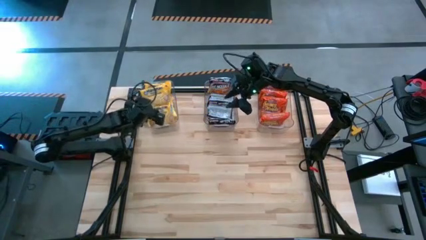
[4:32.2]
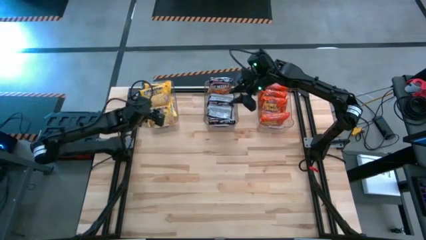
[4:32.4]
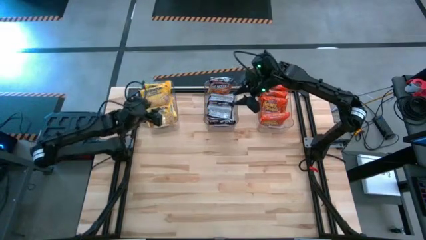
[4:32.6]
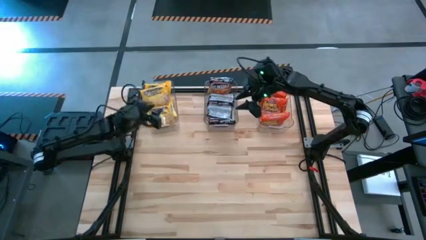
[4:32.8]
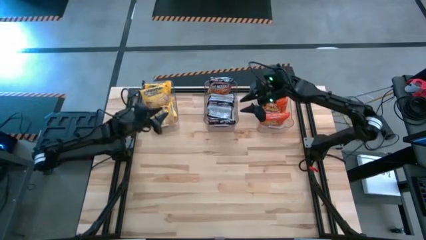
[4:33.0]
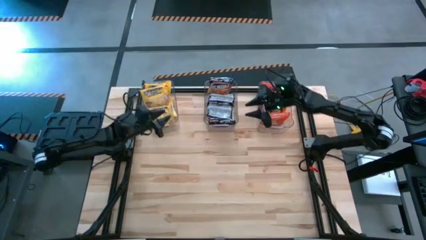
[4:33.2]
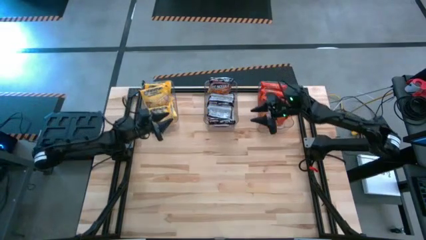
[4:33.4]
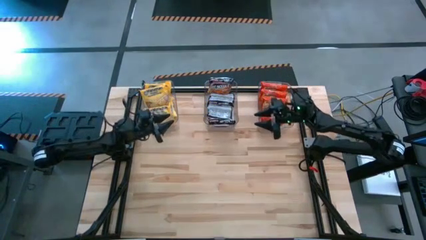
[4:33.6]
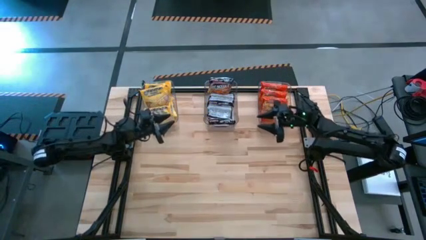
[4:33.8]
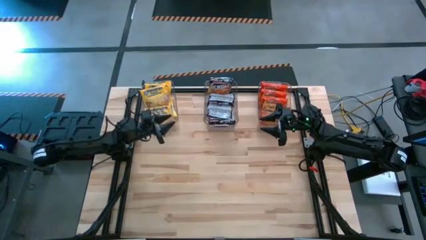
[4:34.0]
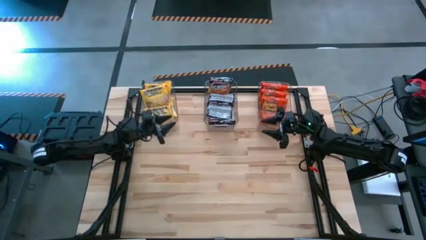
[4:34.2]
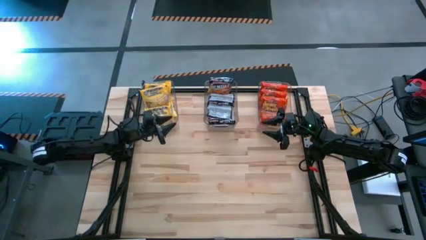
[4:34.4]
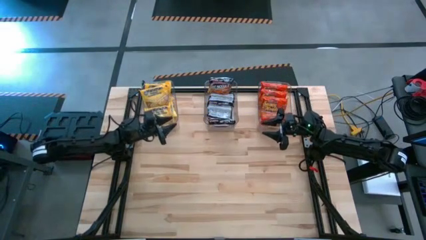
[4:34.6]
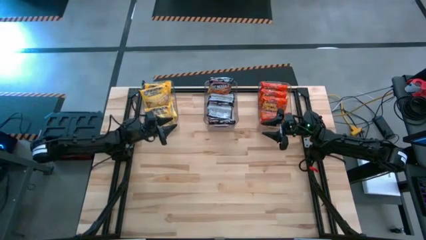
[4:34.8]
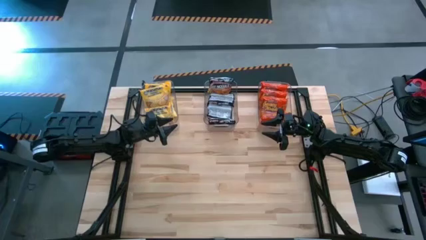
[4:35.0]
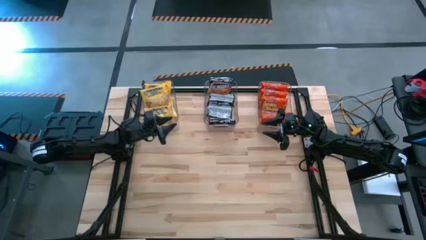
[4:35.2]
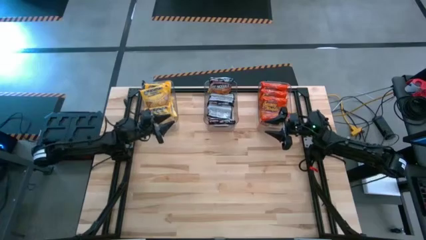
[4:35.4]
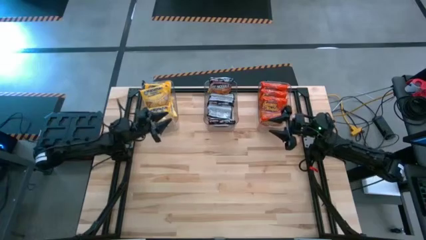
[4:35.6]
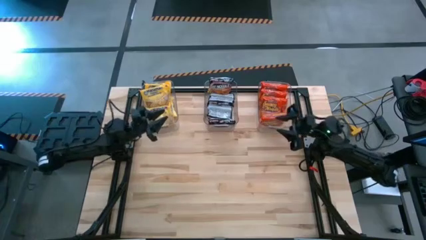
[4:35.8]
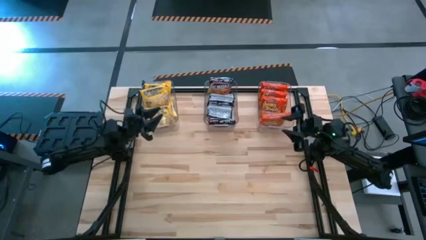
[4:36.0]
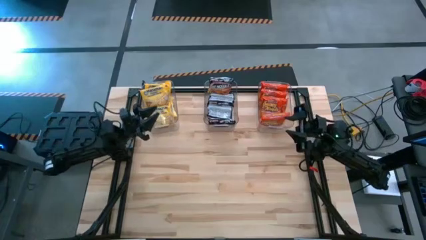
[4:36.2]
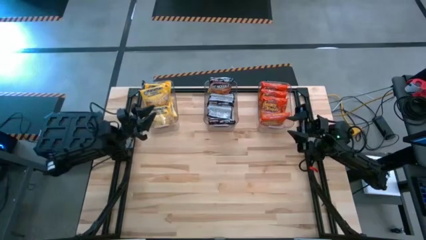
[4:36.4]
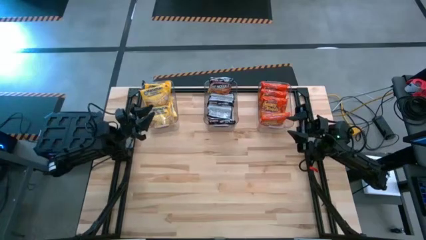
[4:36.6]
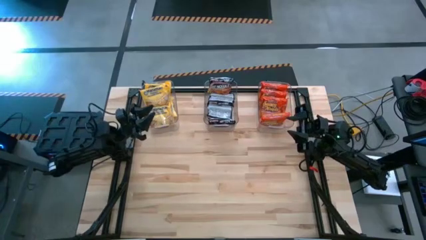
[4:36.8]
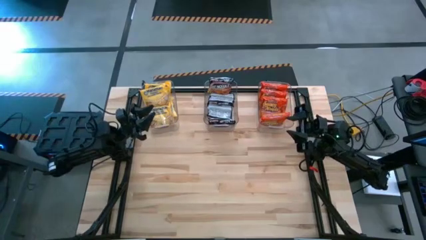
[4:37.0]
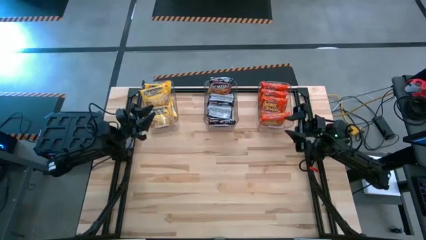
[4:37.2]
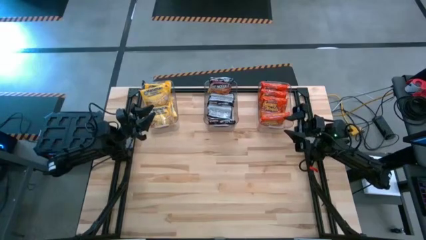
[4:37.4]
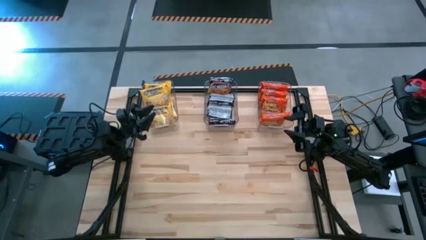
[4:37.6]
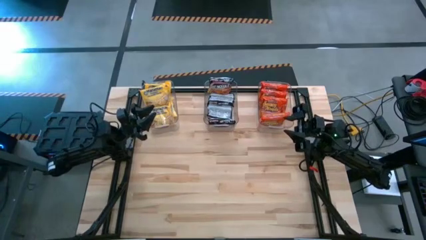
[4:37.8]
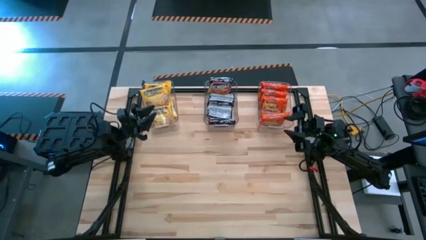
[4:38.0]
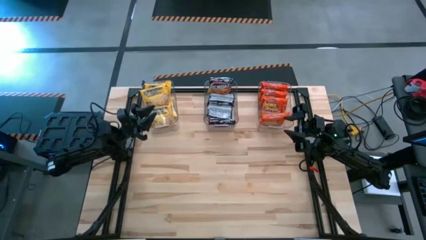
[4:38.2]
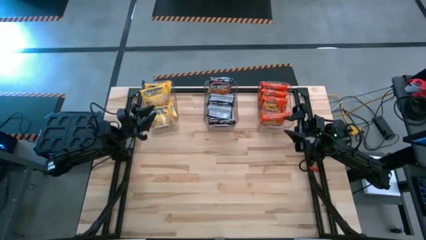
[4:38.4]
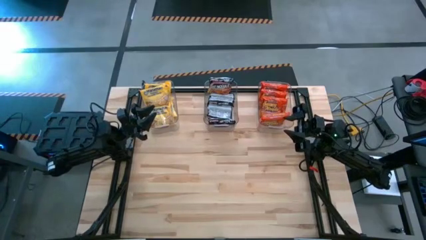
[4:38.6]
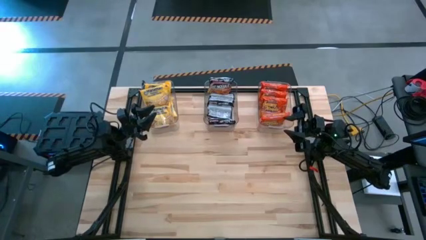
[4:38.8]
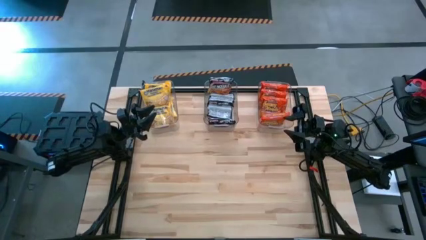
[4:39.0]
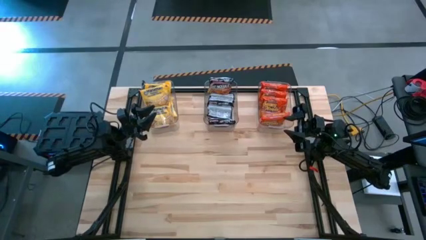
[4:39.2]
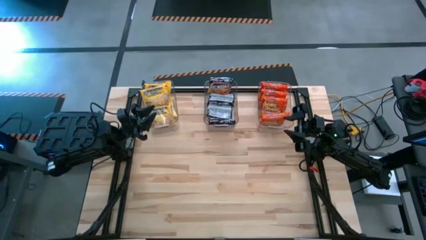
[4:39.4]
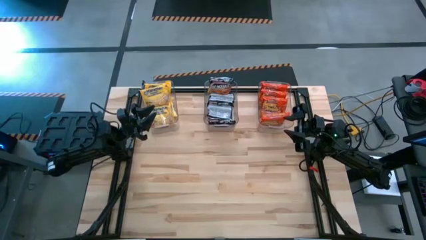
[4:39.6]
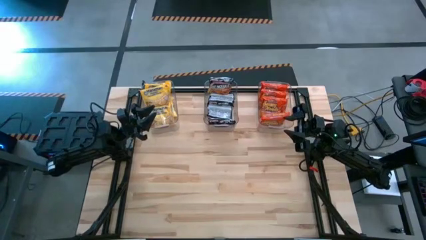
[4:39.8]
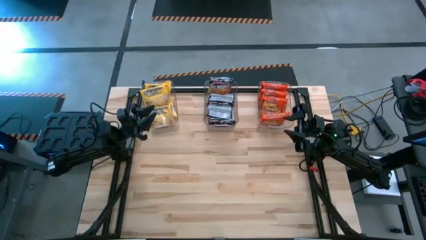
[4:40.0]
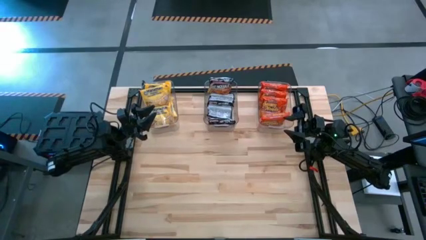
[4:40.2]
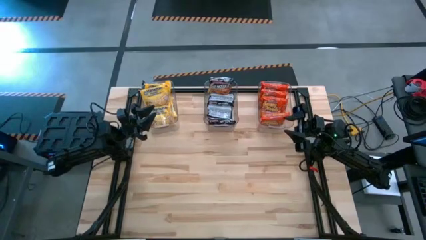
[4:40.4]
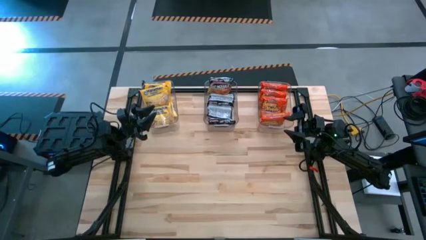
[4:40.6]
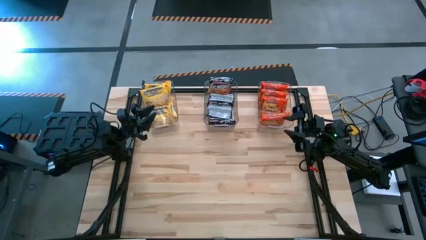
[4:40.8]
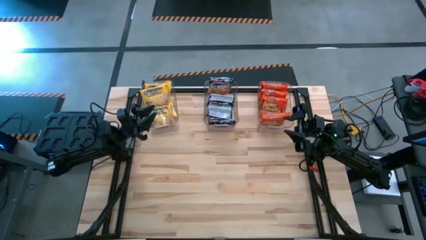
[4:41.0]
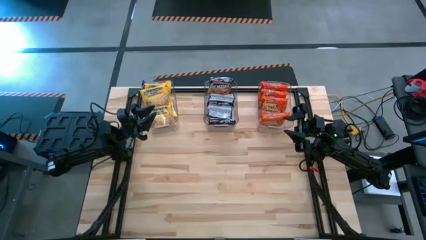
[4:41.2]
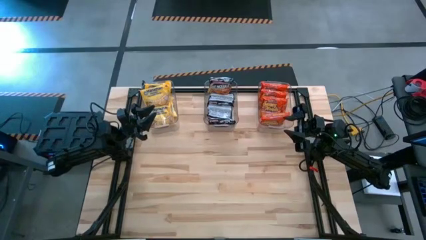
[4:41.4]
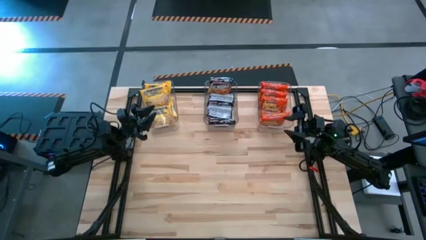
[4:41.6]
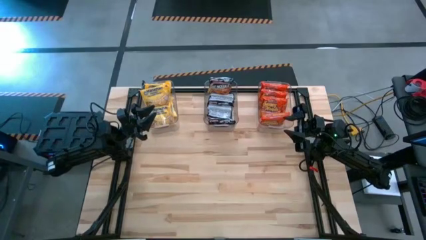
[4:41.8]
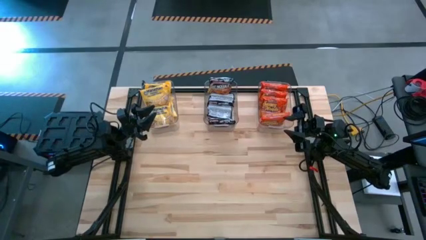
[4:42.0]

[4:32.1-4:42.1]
Task: Sort Maruchan noodles
Return to Home Position

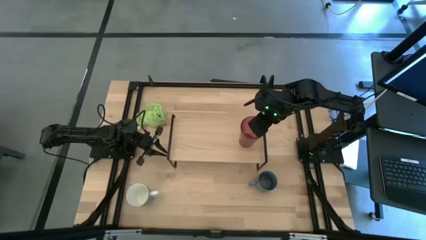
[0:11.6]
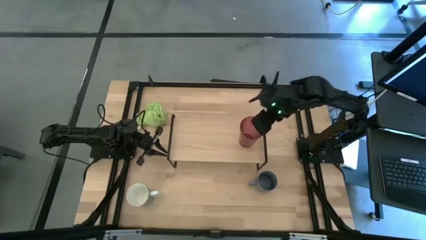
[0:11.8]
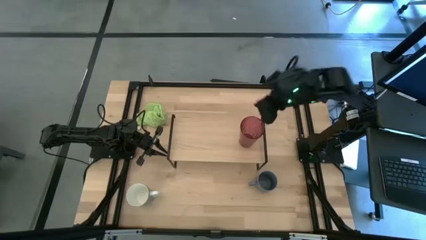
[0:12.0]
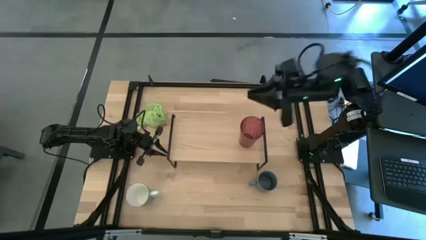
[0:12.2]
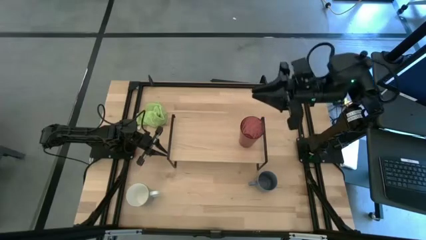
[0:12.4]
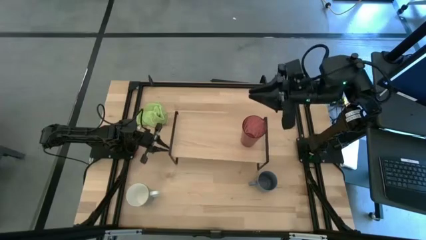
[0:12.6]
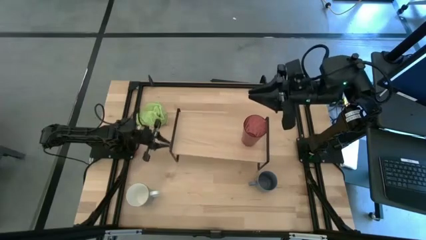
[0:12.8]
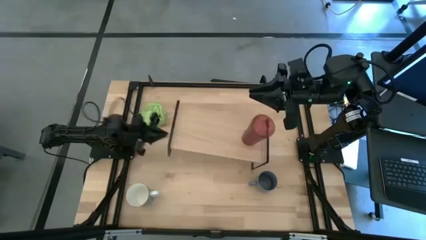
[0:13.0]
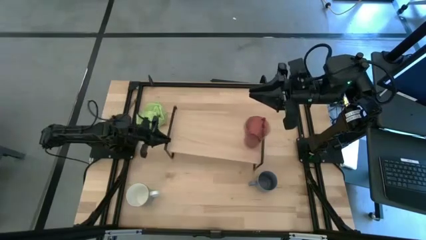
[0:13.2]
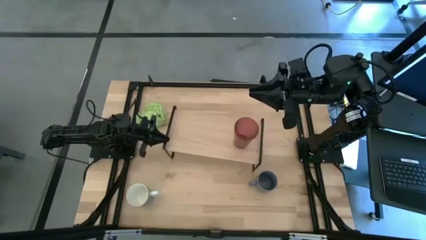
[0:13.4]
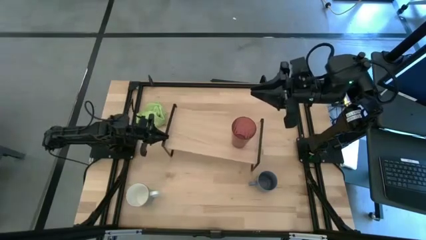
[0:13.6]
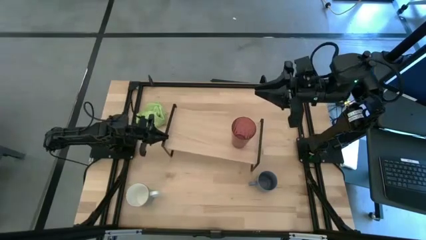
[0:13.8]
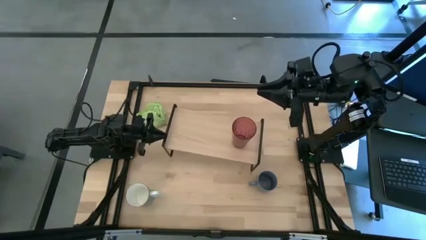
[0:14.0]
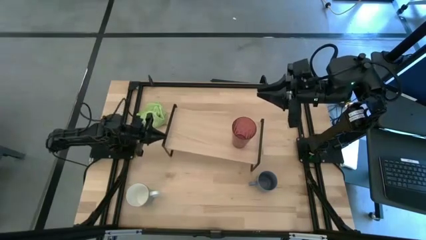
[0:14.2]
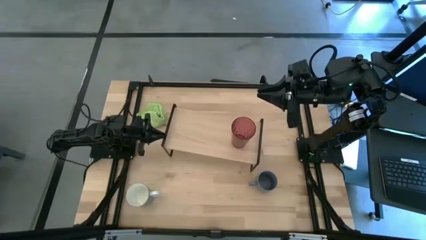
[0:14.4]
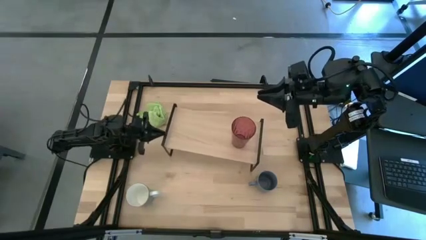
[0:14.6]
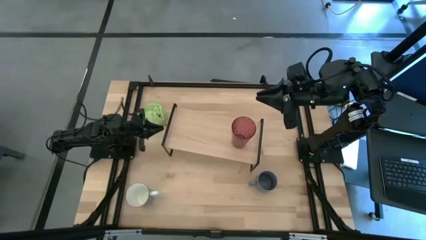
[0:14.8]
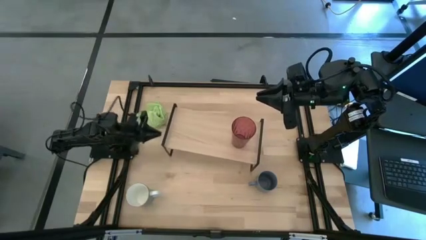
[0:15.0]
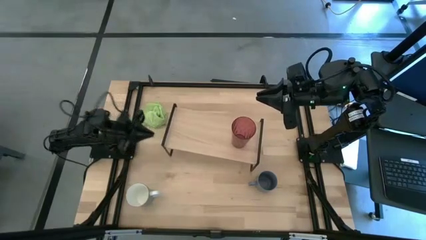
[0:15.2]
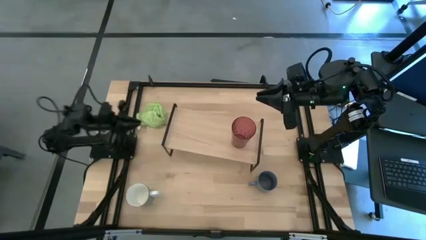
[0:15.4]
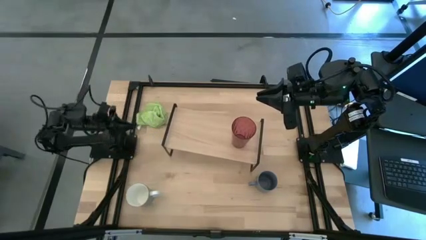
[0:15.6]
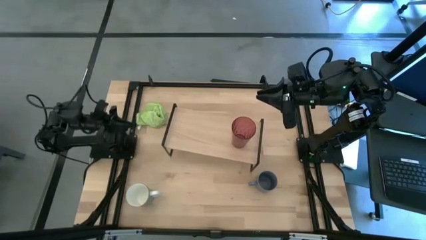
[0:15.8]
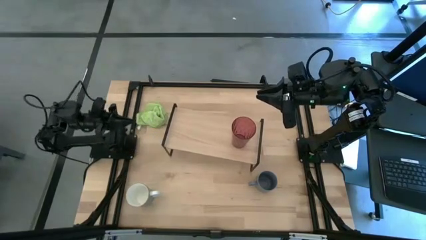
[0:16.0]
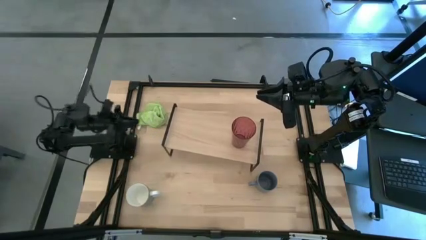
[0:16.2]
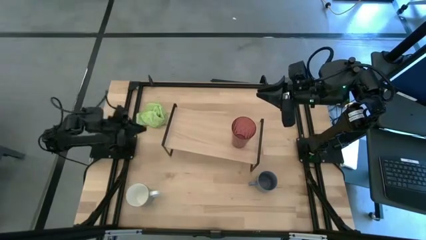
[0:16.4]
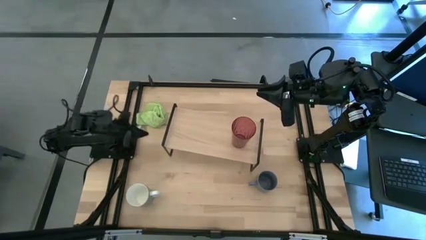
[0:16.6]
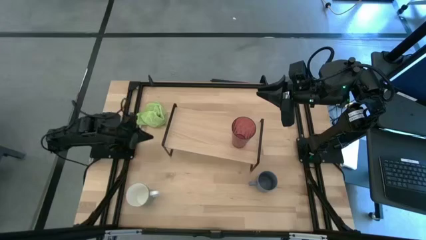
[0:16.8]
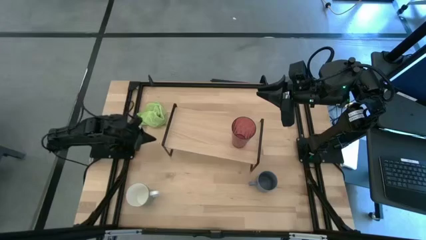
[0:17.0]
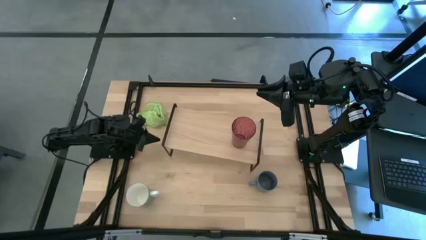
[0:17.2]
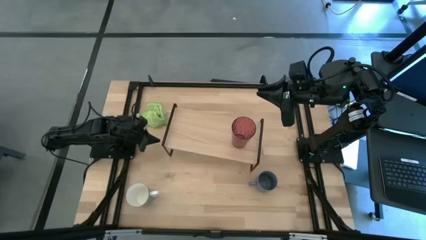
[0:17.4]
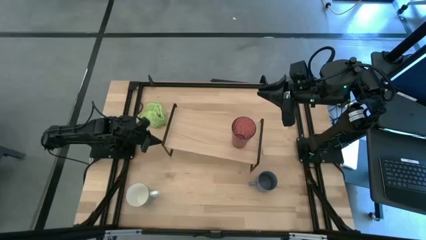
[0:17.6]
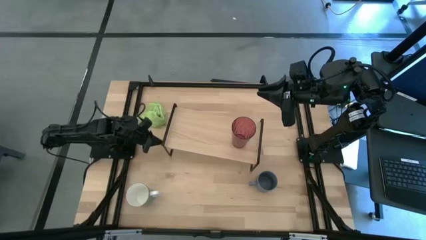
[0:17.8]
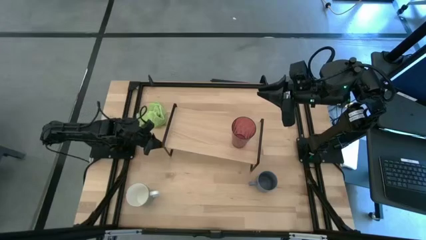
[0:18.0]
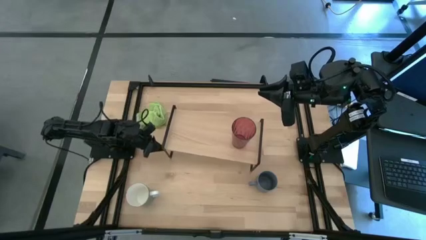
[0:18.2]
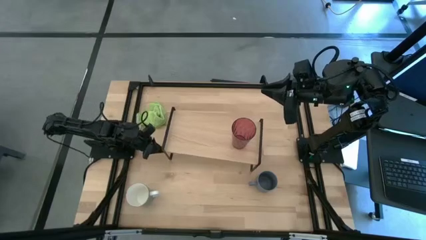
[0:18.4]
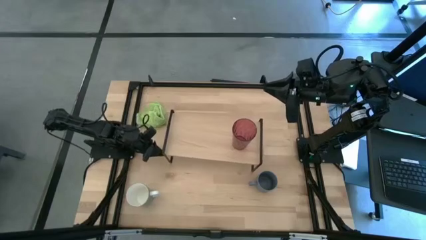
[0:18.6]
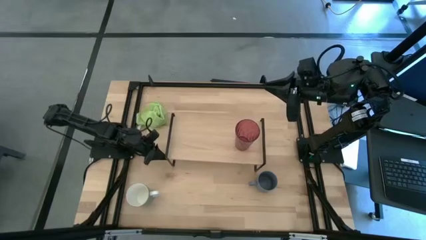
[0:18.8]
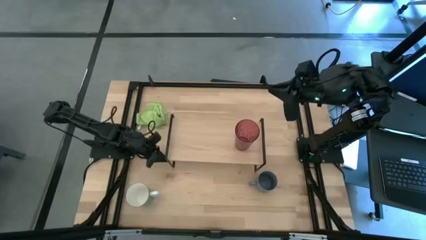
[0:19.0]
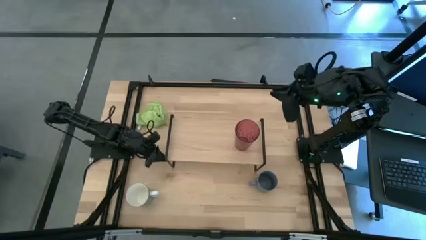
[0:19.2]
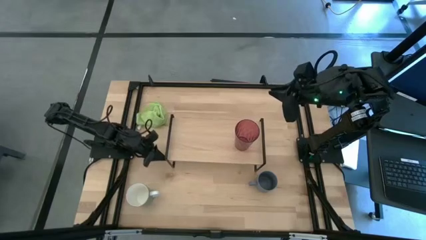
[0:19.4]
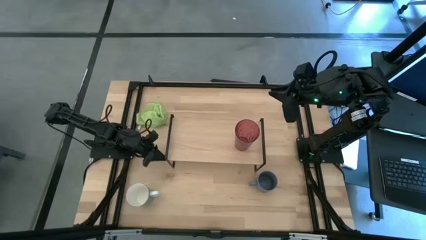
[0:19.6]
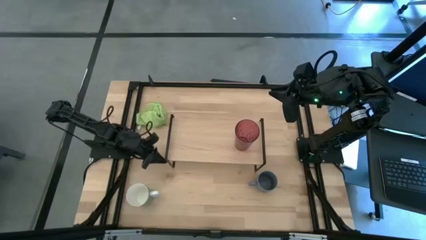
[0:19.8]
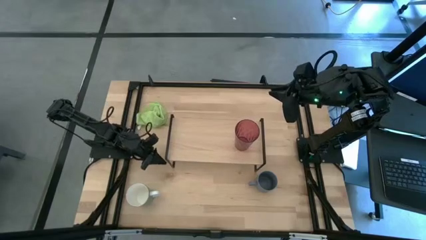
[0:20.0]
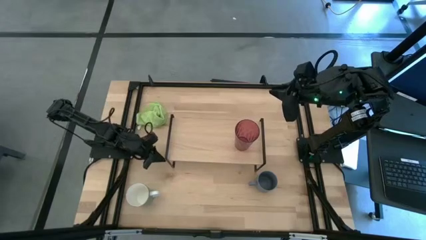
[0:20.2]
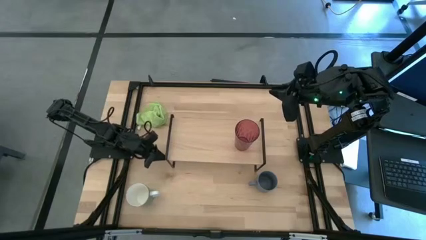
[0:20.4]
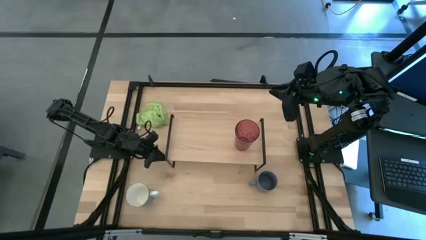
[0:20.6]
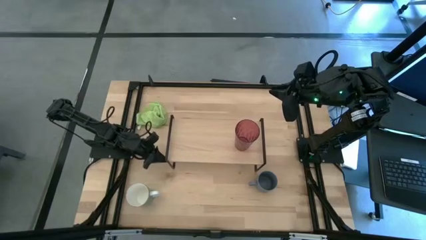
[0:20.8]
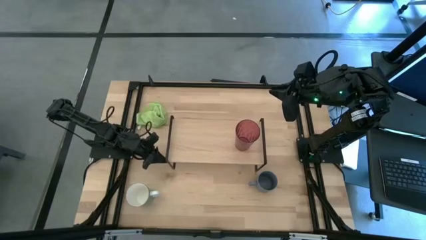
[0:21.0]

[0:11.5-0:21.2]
Task: Stack small to large cups/mugs on shelf
Adjust the shelf on the table
